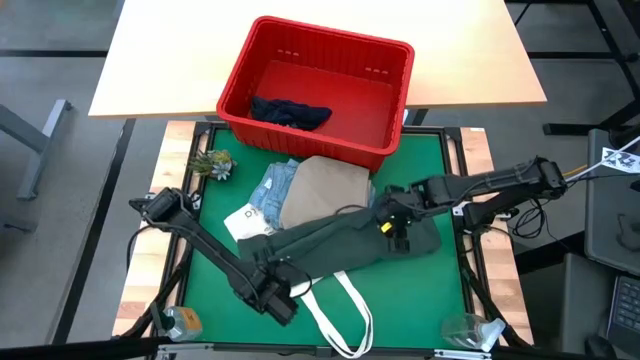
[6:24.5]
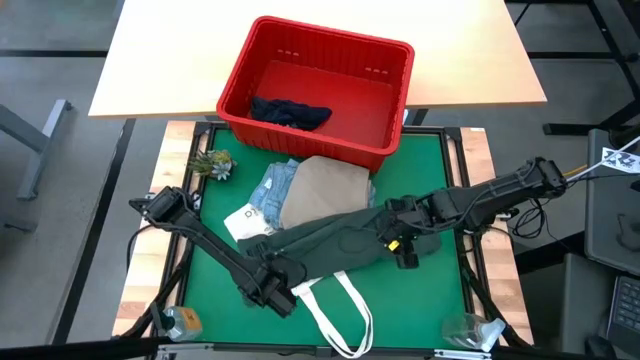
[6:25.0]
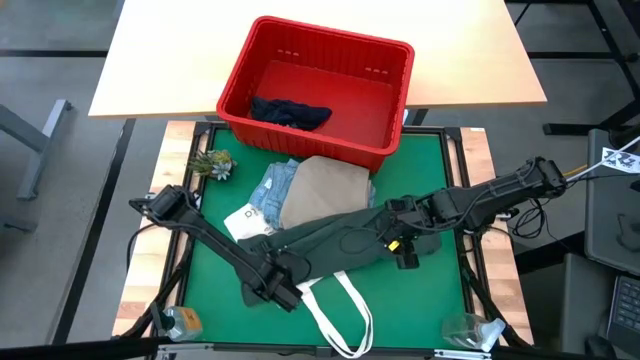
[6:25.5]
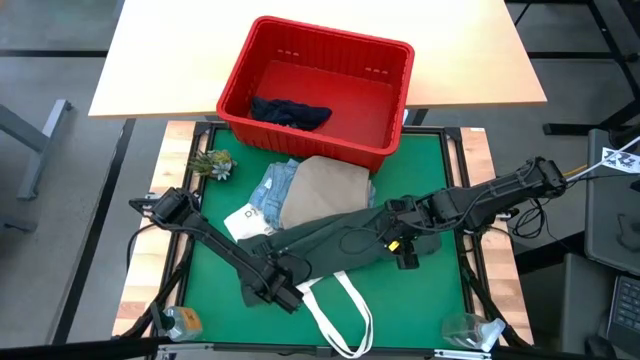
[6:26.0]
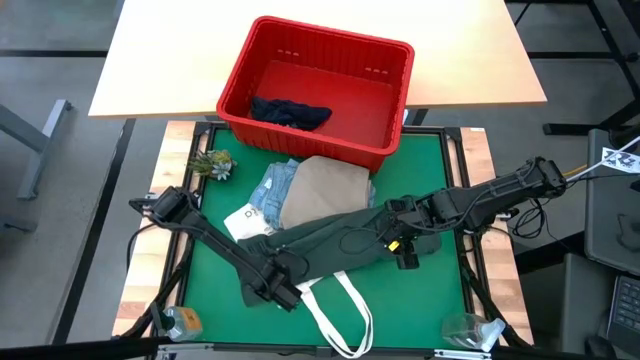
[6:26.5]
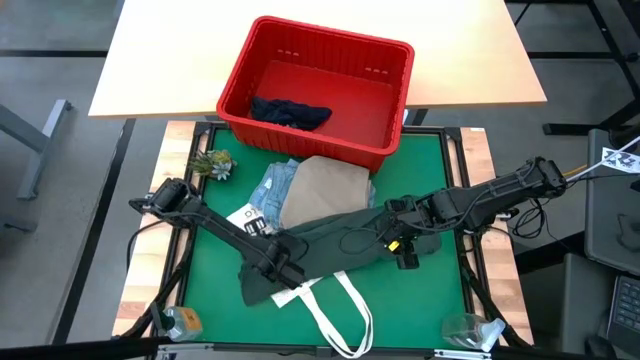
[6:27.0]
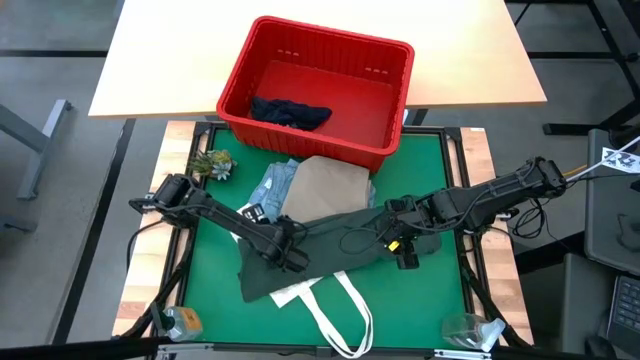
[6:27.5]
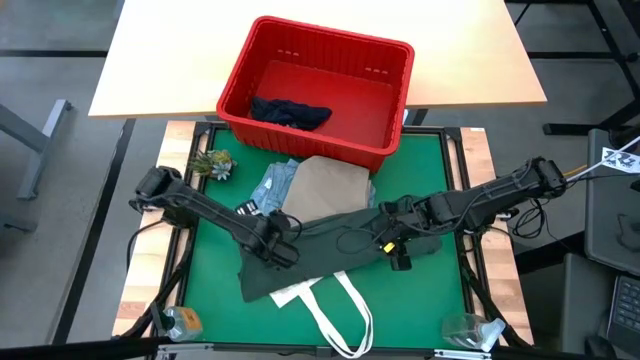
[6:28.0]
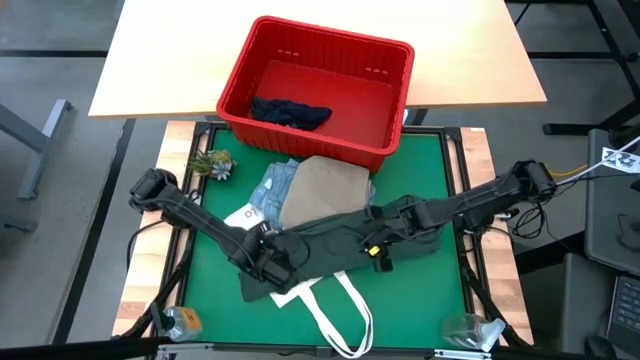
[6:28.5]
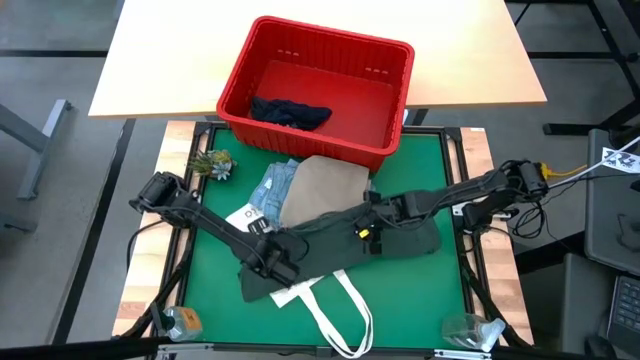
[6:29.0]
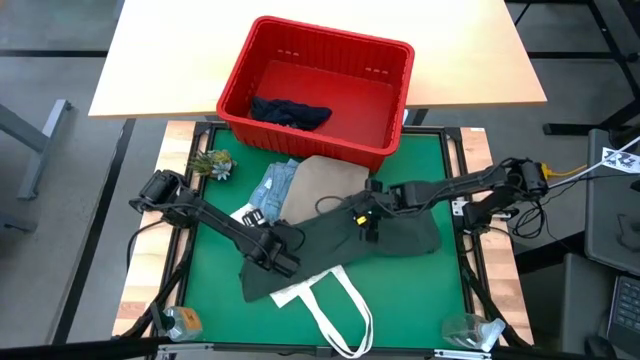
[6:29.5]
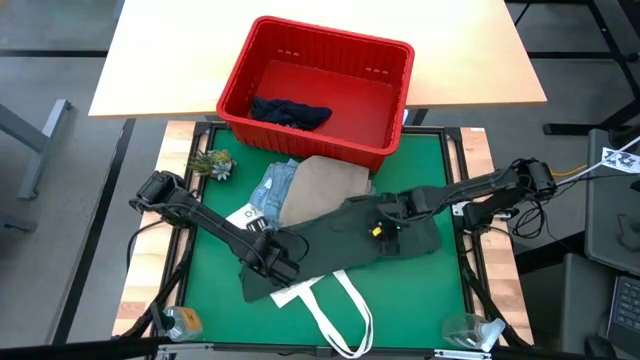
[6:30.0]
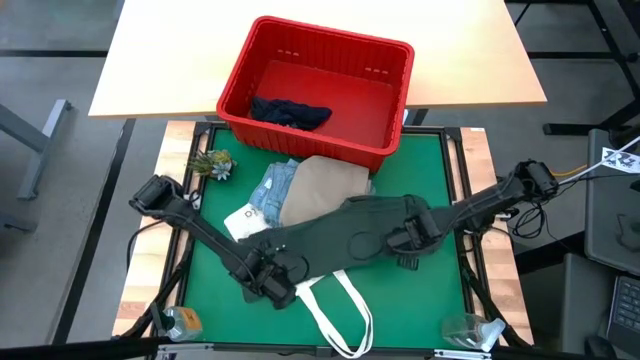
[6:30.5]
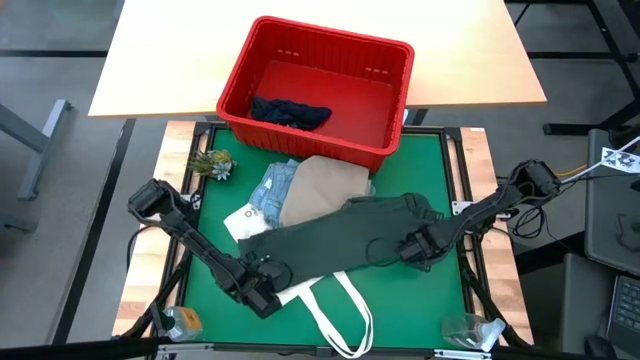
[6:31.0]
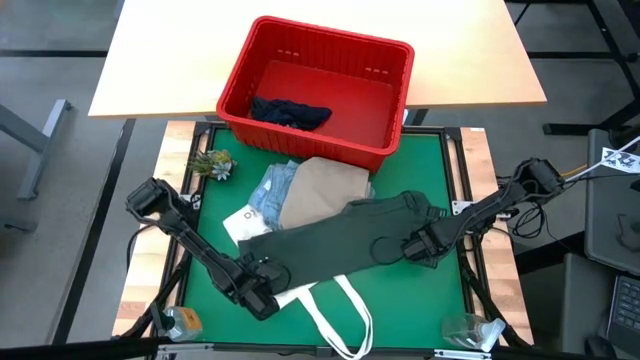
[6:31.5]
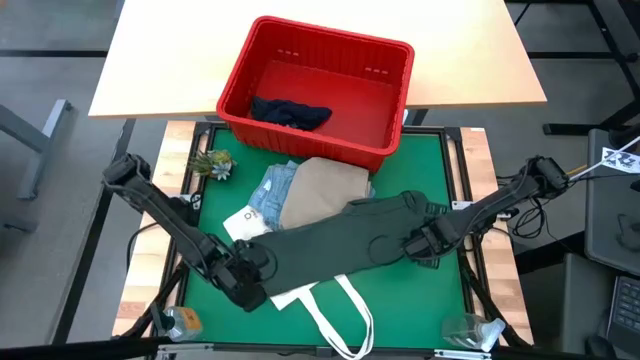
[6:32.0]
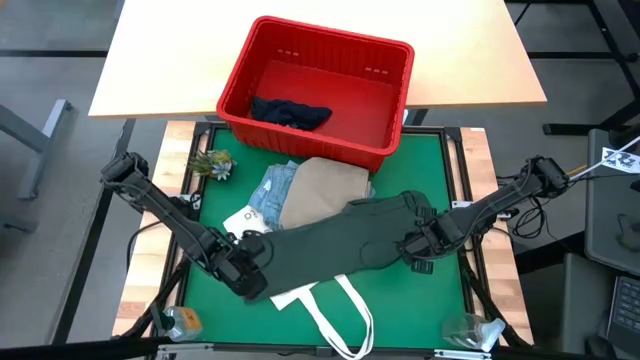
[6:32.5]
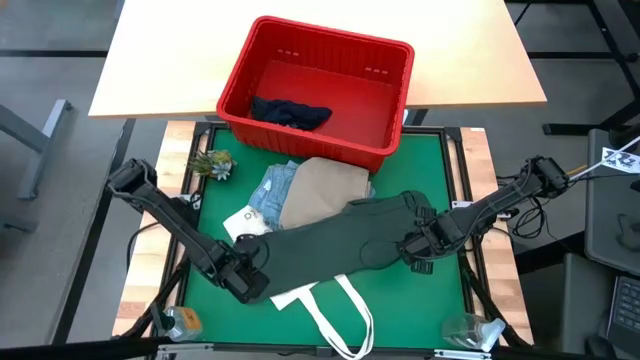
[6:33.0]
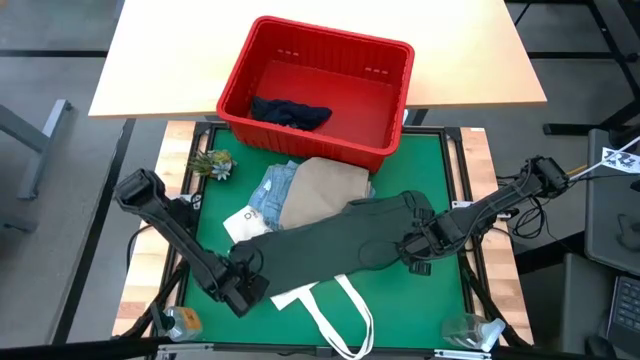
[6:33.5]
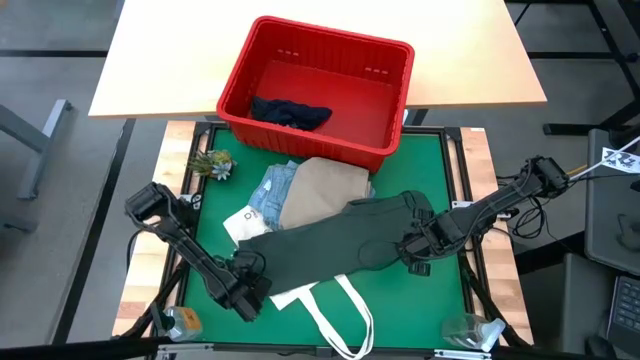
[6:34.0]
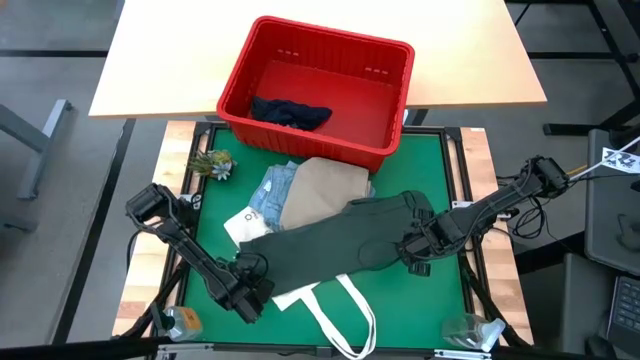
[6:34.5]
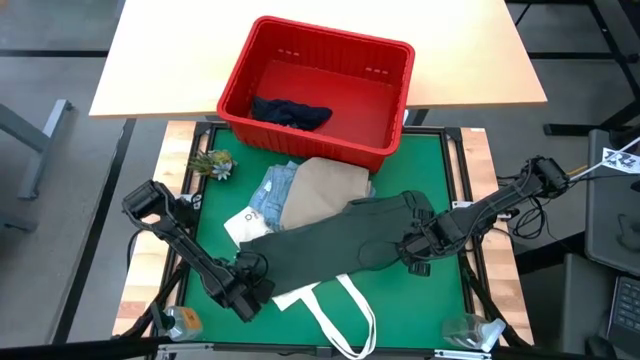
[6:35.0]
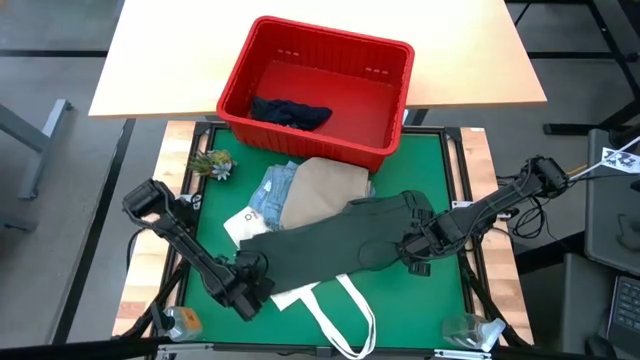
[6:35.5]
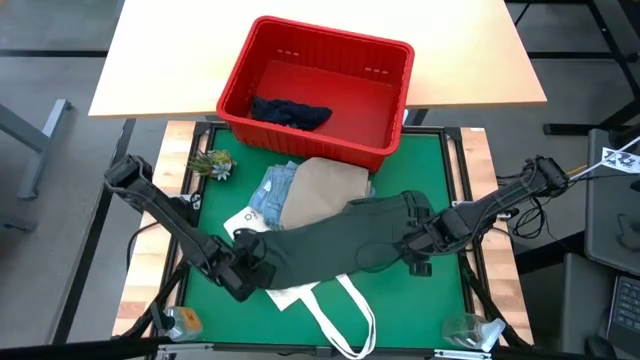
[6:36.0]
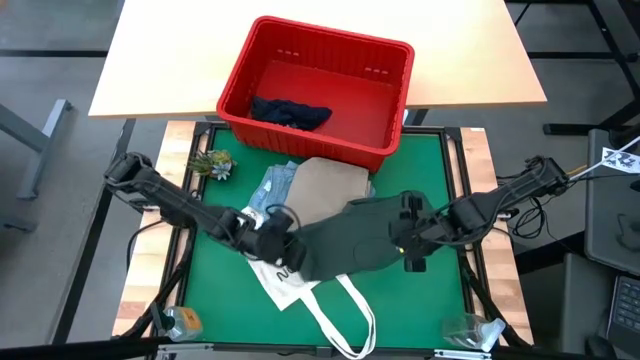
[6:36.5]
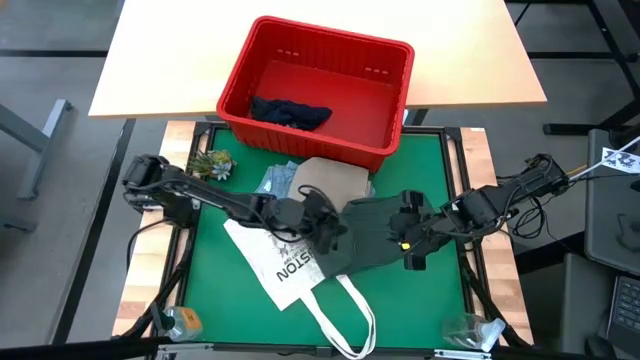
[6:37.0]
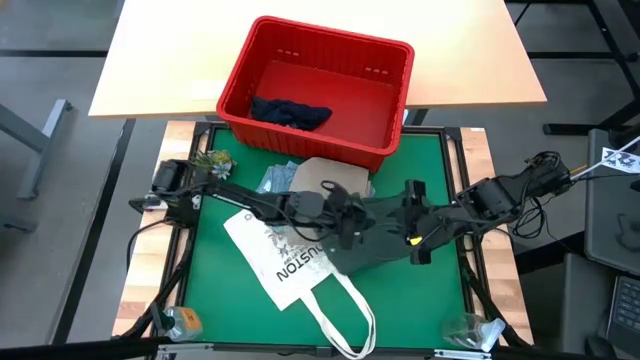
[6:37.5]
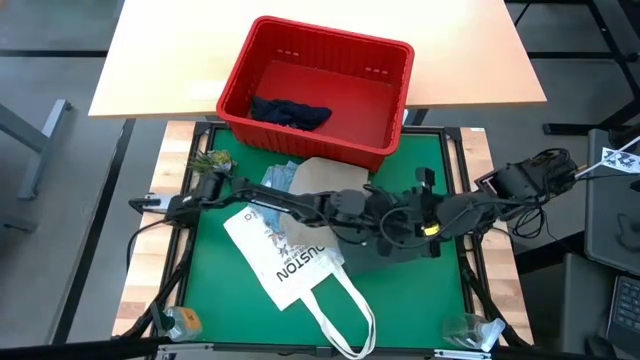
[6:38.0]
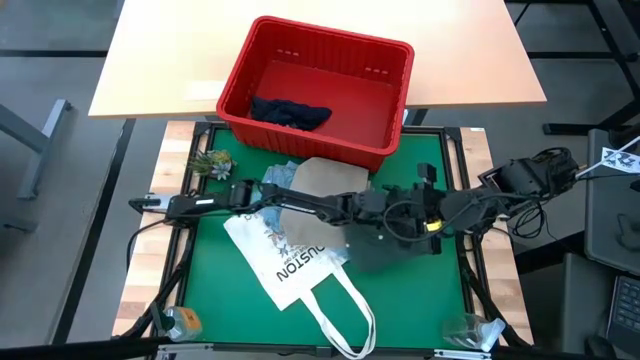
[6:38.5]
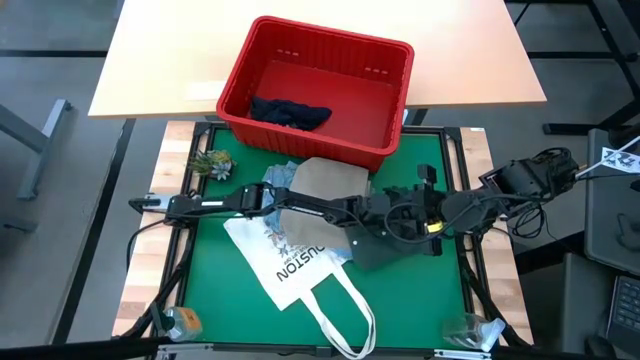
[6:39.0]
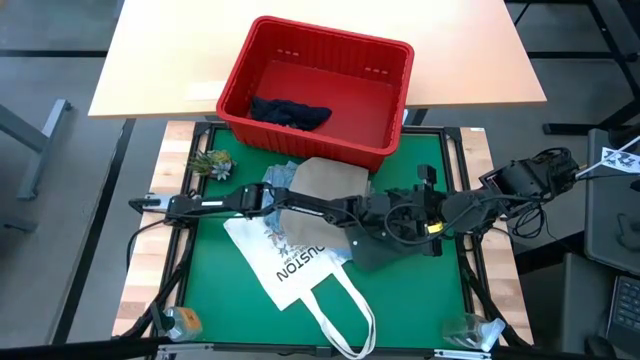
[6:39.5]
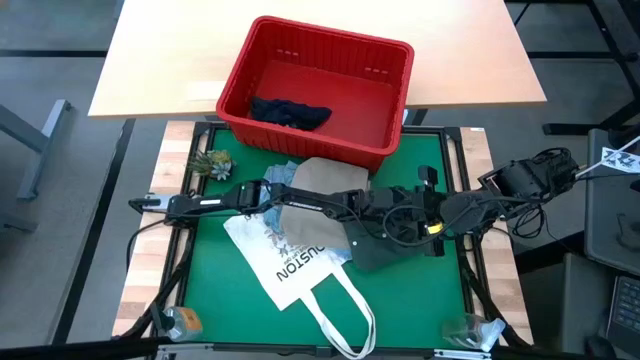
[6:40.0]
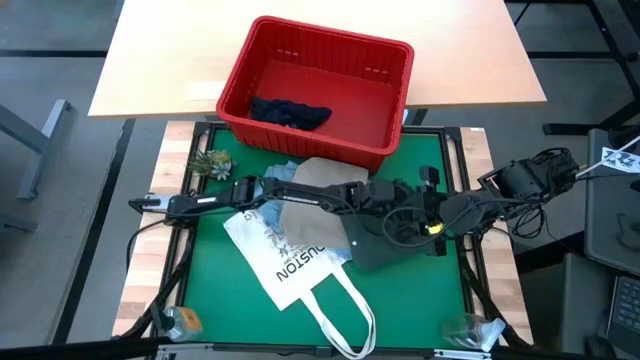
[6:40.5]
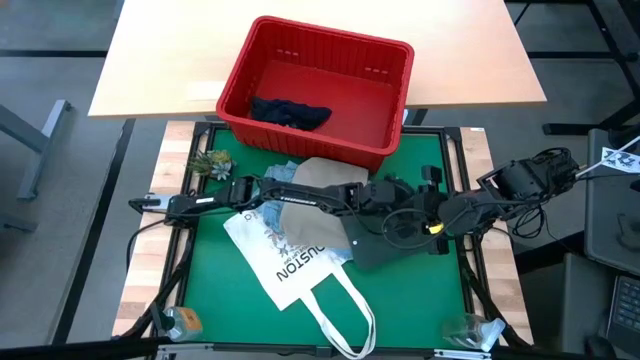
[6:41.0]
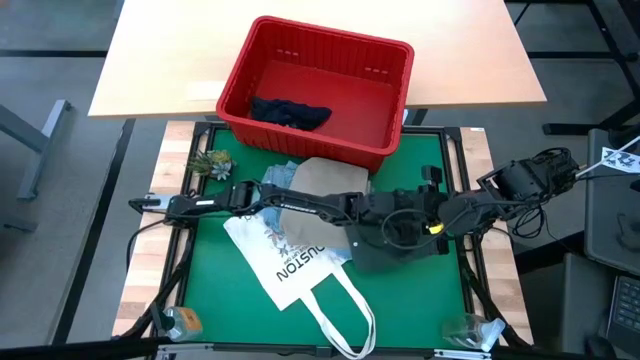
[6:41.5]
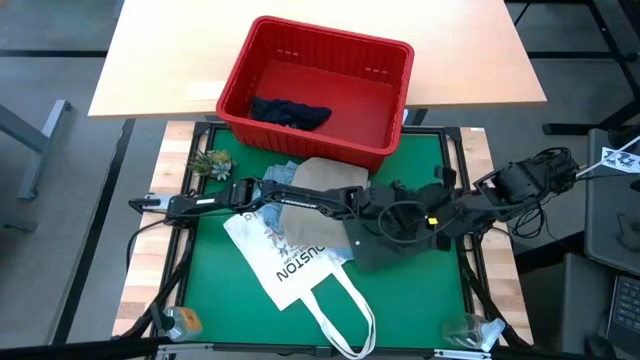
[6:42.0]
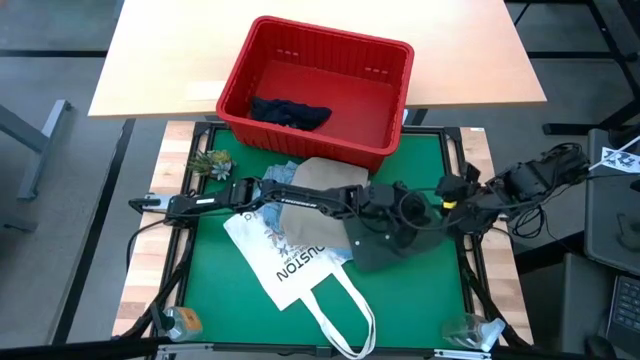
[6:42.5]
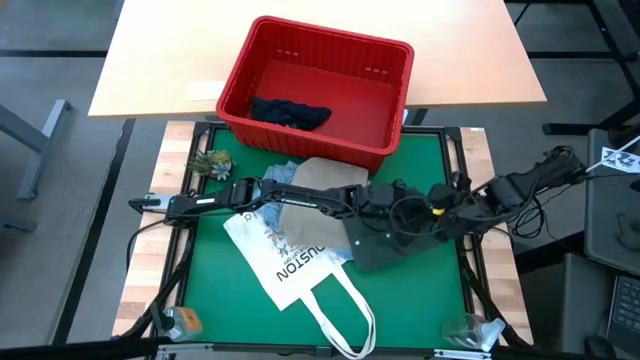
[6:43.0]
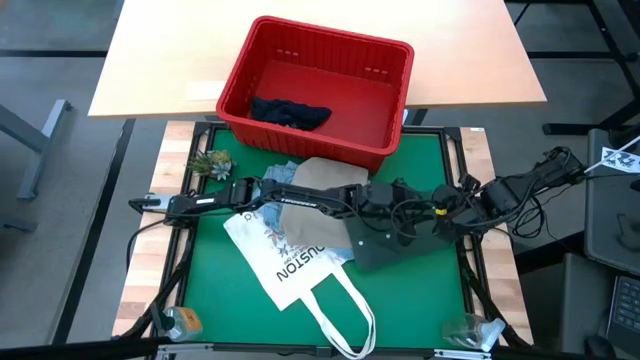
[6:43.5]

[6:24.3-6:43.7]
Task: Fold Laundry from Bin
Fold the green shirt
